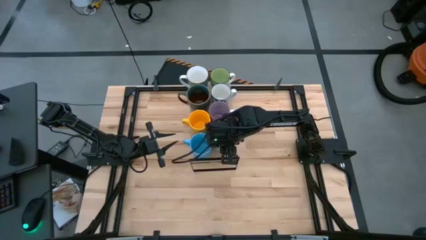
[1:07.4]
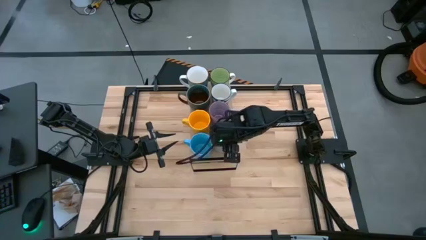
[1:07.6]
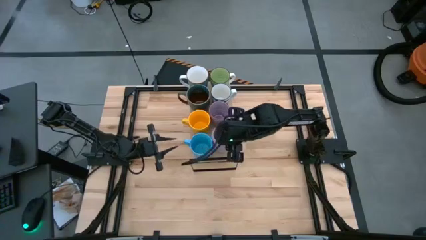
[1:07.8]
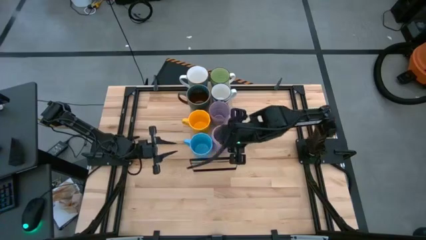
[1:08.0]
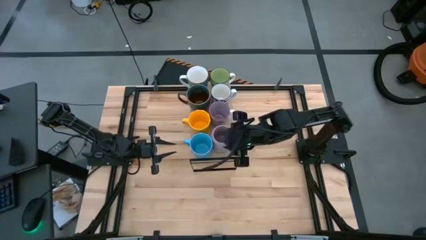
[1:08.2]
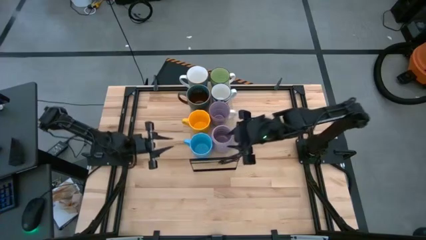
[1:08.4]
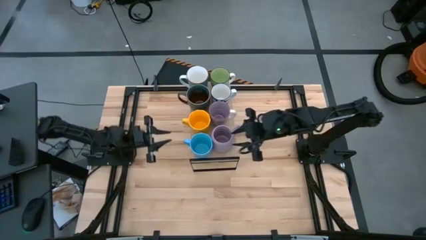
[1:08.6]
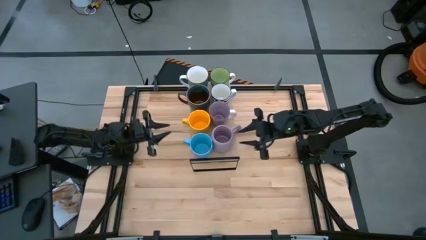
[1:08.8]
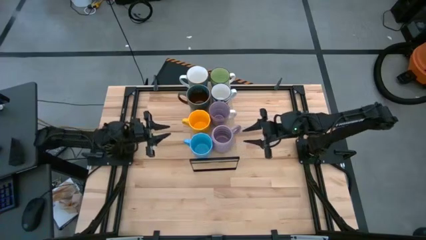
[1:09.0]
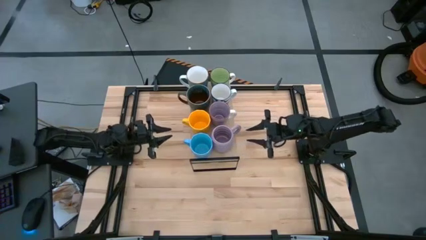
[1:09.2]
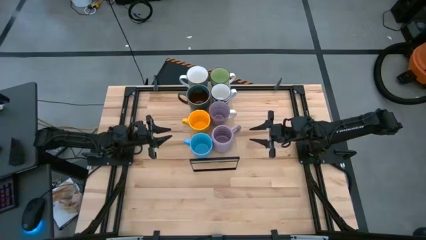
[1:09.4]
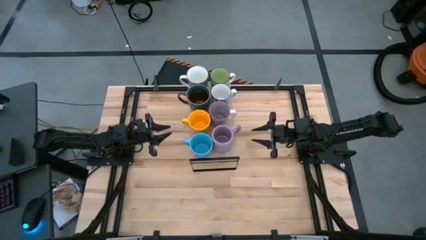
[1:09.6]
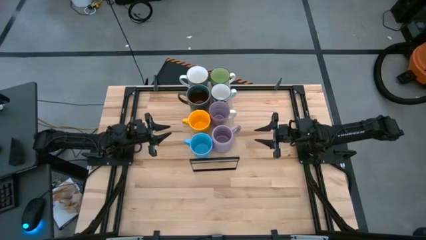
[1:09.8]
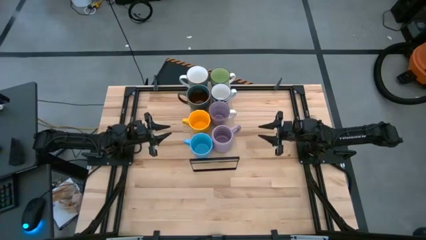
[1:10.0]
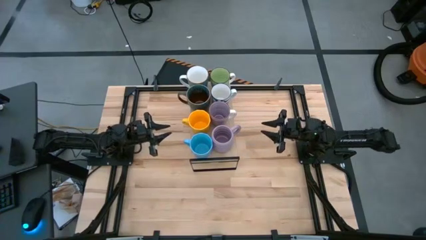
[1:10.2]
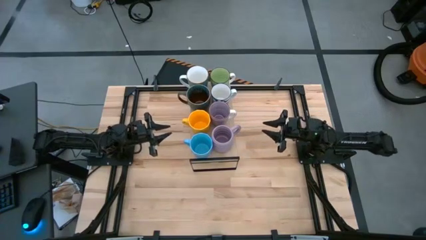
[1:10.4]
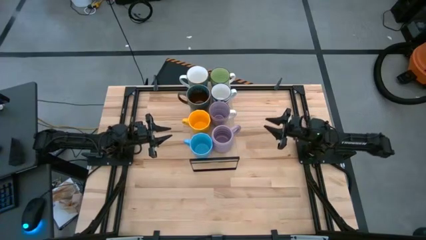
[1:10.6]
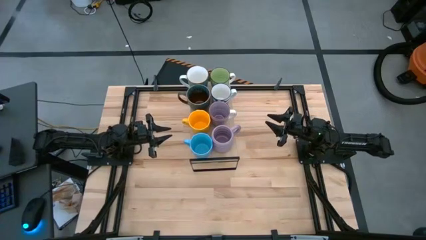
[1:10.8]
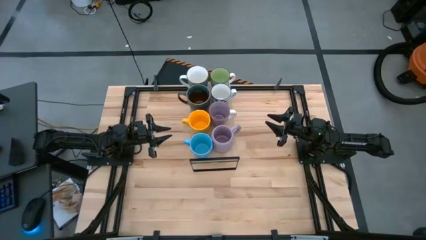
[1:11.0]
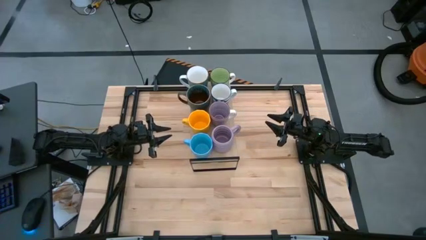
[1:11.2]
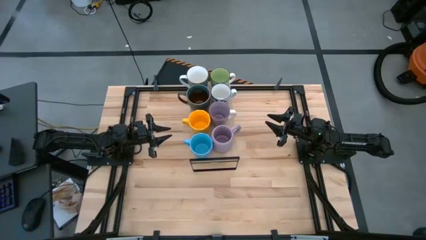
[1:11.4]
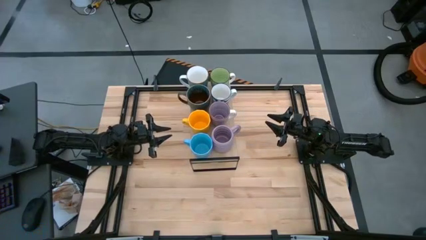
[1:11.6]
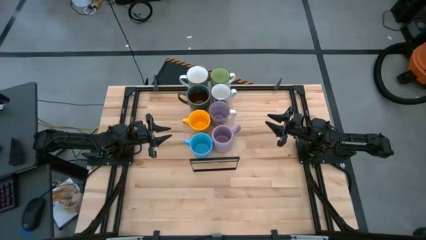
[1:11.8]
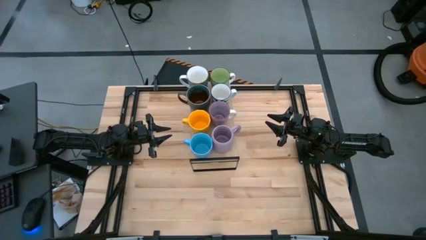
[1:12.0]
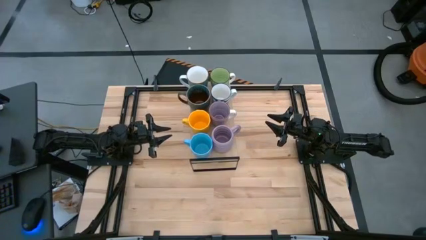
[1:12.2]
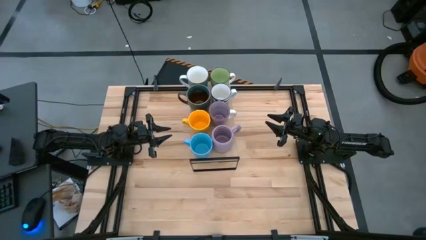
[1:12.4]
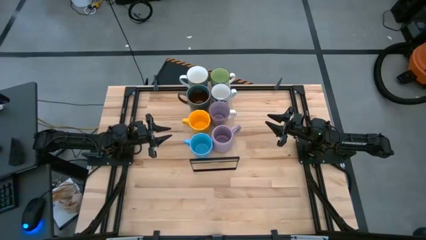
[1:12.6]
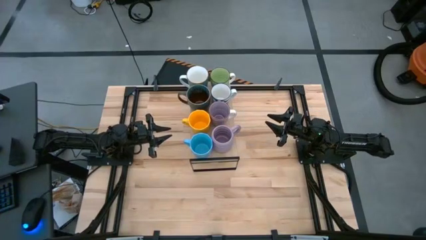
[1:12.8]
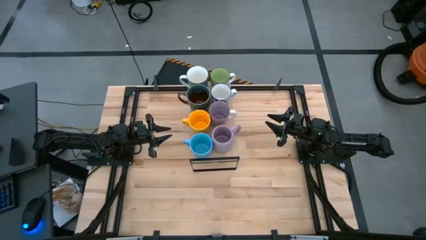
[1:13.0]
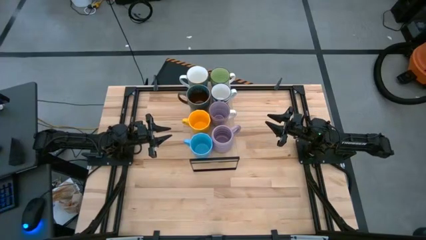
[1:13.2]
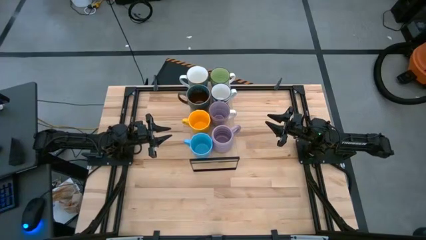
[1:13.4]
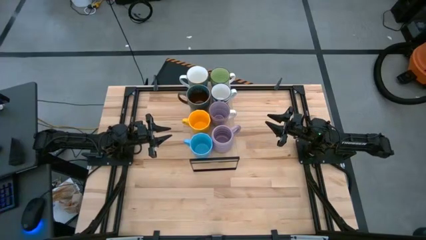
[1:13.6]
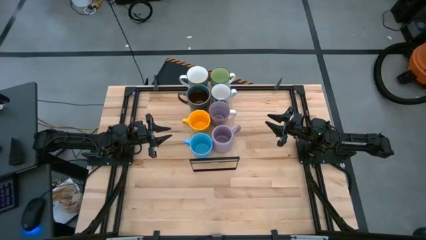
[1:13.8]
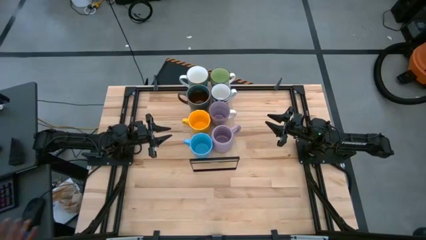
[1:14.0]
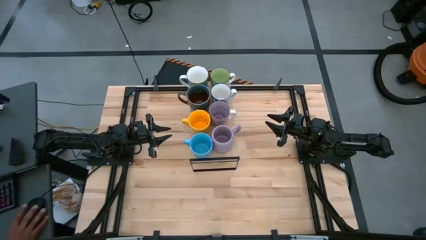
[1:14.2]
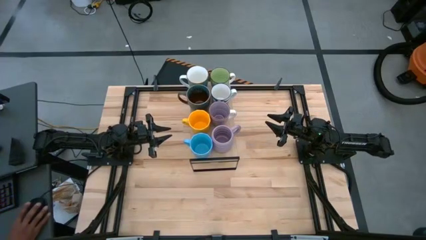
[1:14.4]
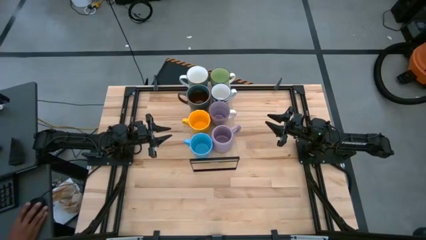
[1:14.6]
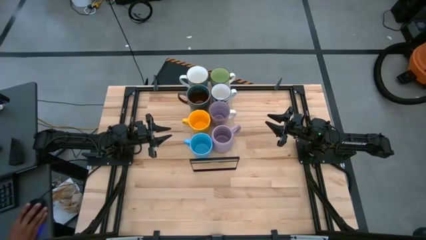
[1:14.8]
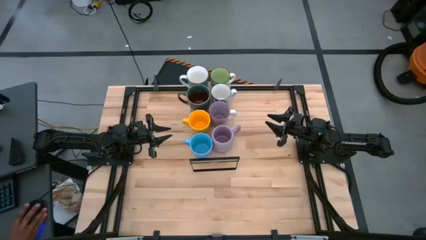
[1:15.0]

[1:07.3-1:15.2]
Task: Place coffee mugs
Return to Home Position

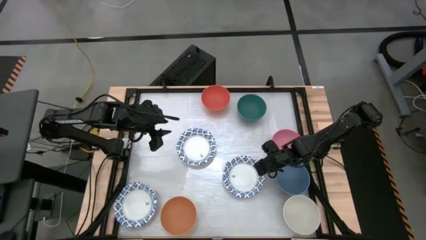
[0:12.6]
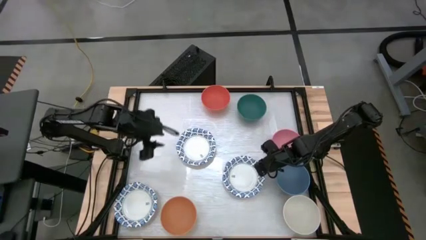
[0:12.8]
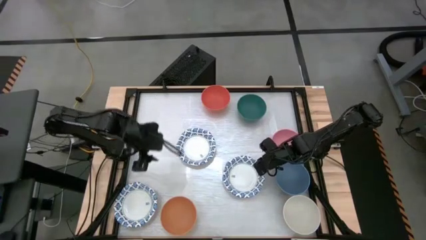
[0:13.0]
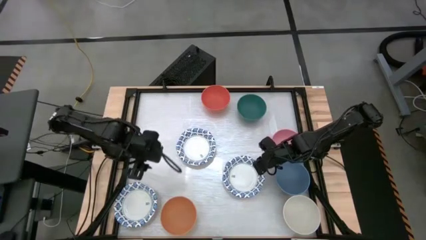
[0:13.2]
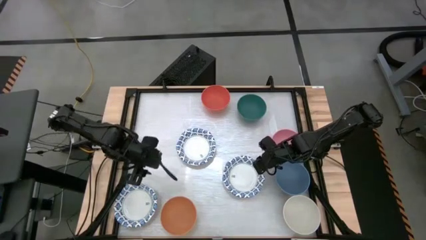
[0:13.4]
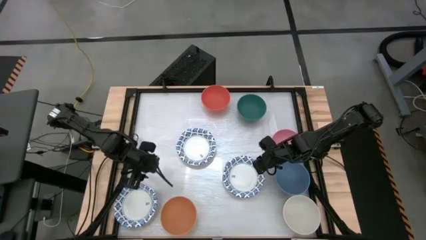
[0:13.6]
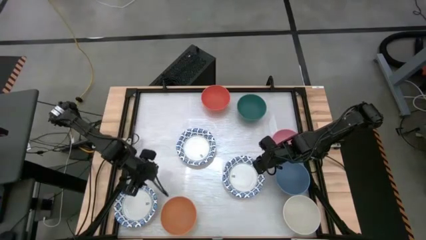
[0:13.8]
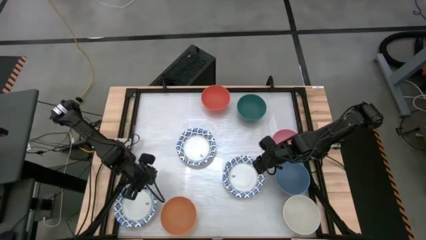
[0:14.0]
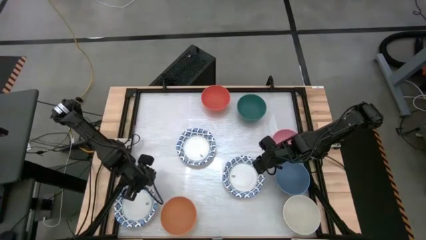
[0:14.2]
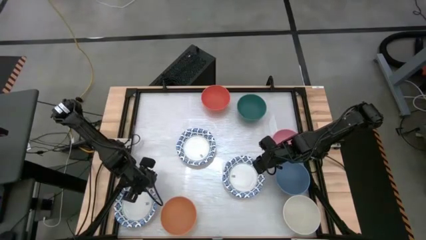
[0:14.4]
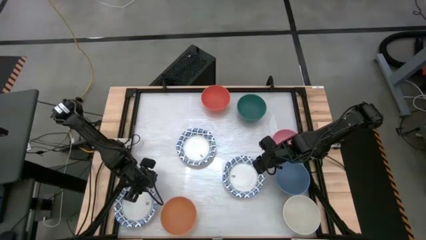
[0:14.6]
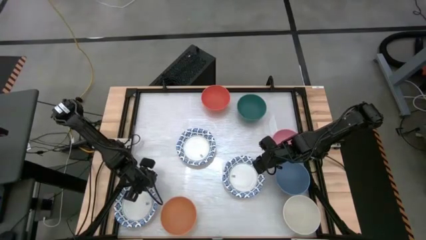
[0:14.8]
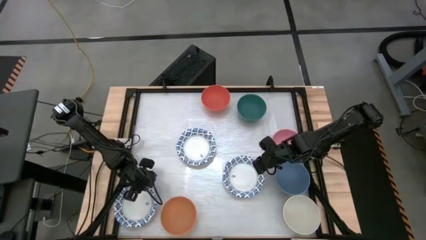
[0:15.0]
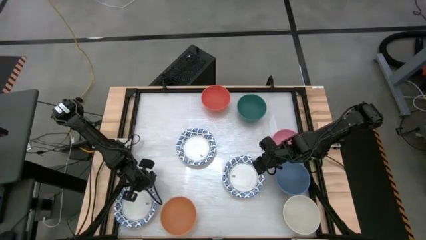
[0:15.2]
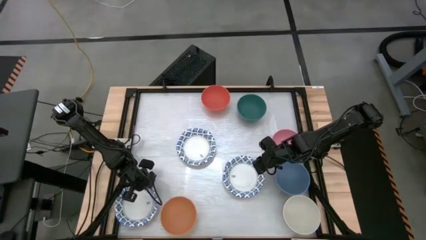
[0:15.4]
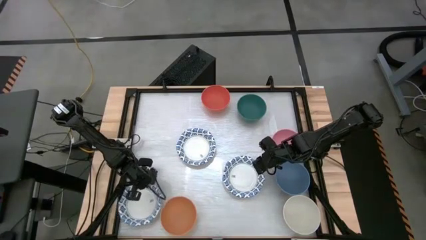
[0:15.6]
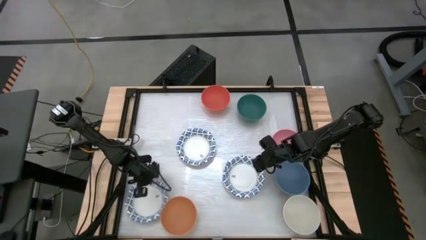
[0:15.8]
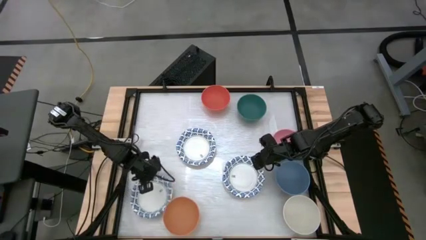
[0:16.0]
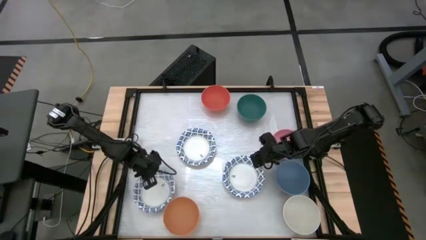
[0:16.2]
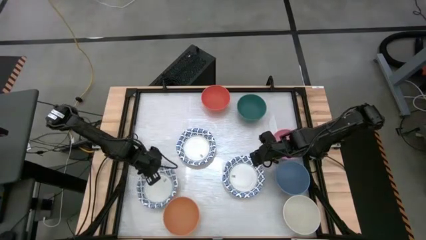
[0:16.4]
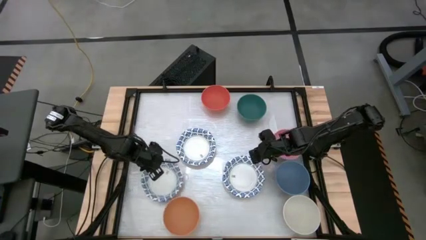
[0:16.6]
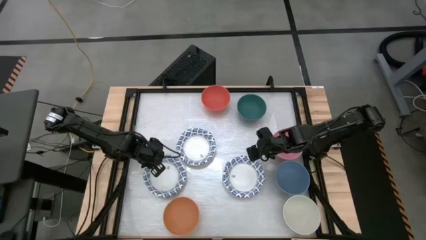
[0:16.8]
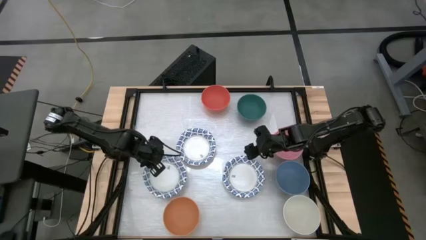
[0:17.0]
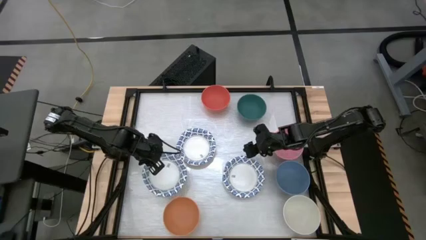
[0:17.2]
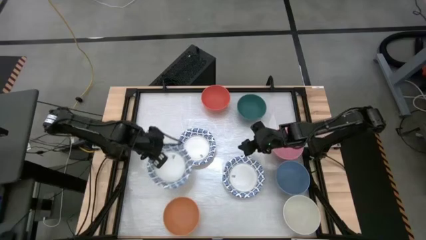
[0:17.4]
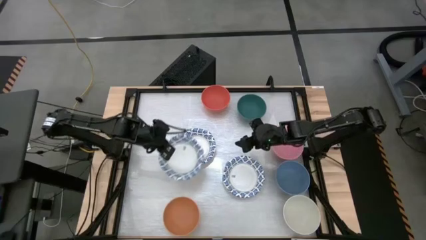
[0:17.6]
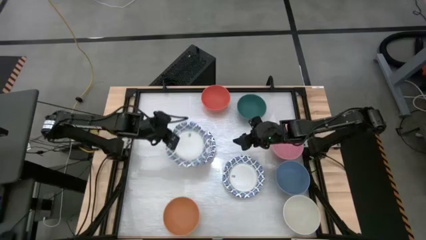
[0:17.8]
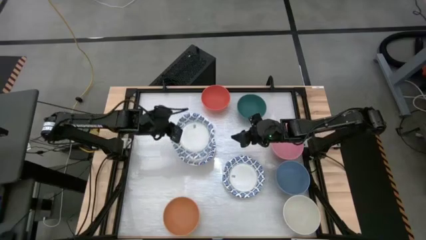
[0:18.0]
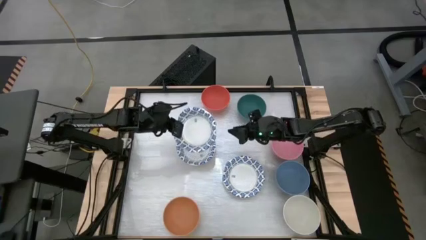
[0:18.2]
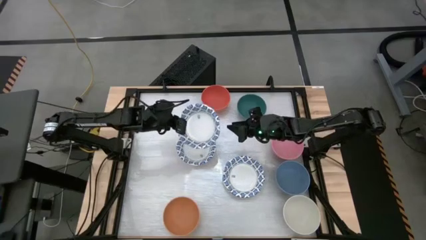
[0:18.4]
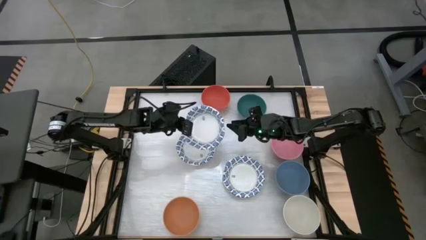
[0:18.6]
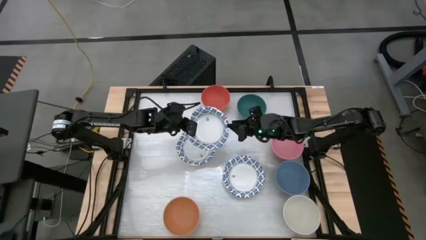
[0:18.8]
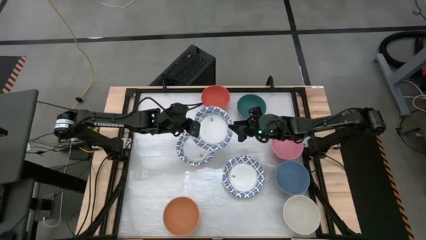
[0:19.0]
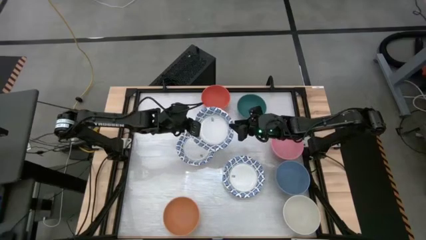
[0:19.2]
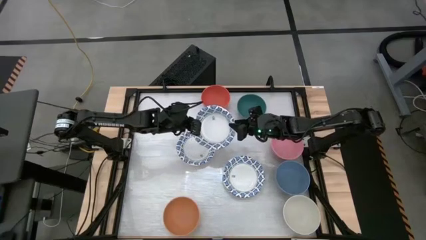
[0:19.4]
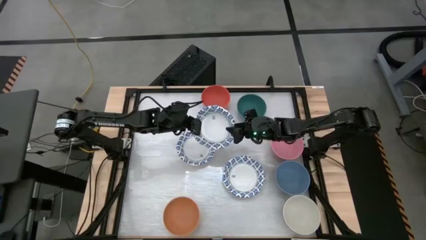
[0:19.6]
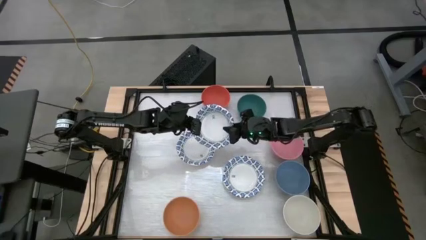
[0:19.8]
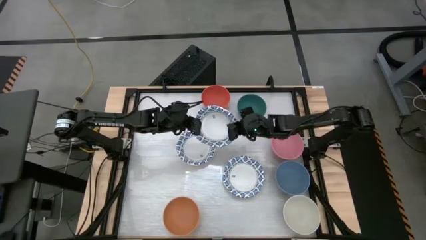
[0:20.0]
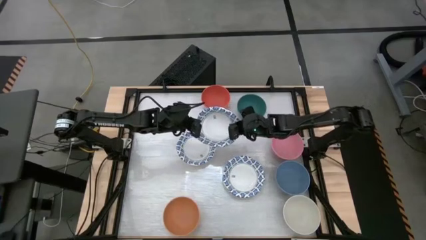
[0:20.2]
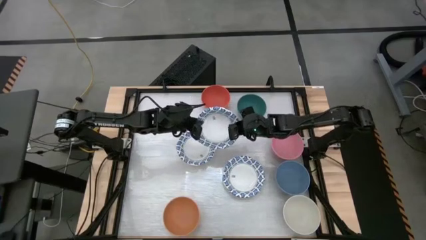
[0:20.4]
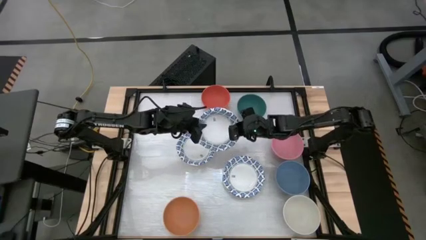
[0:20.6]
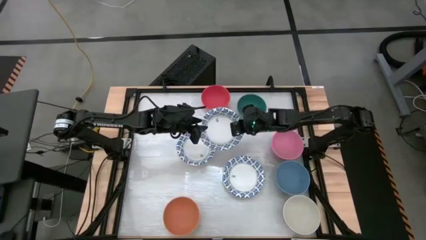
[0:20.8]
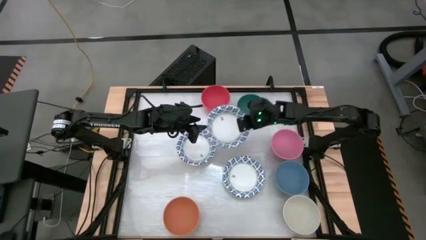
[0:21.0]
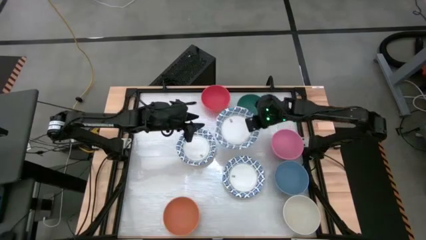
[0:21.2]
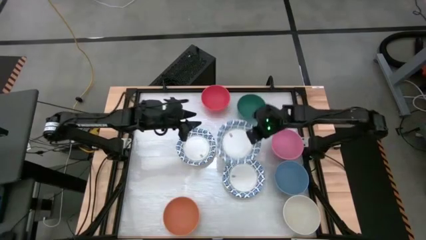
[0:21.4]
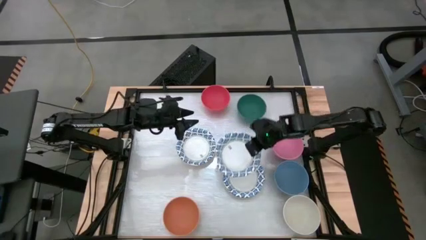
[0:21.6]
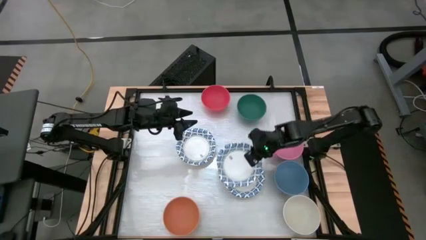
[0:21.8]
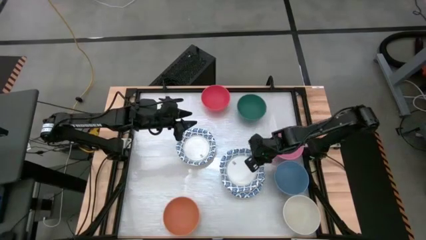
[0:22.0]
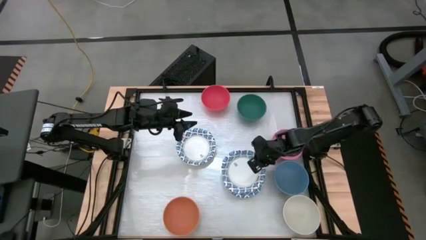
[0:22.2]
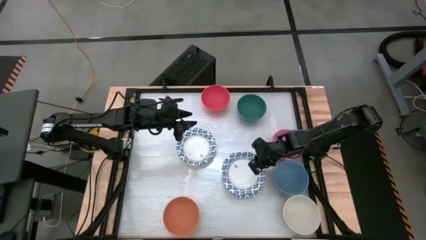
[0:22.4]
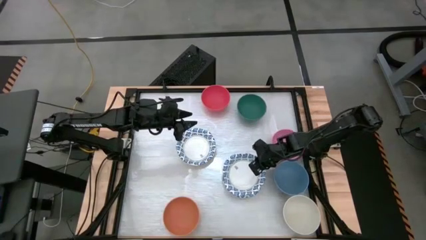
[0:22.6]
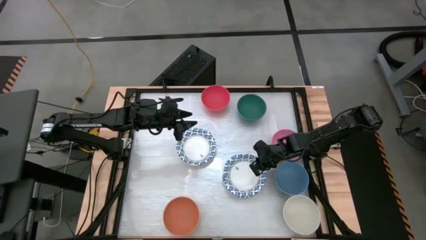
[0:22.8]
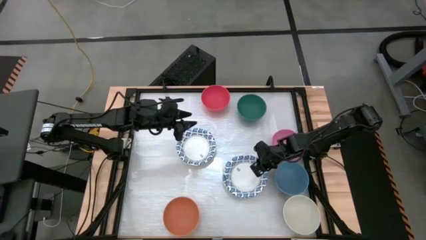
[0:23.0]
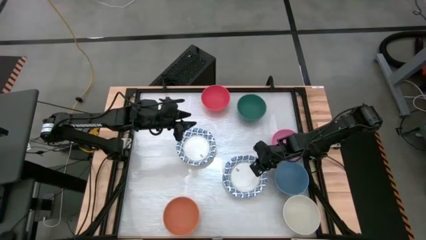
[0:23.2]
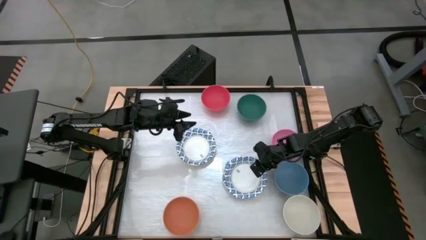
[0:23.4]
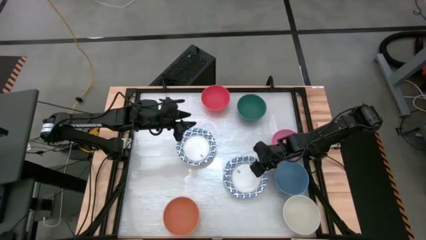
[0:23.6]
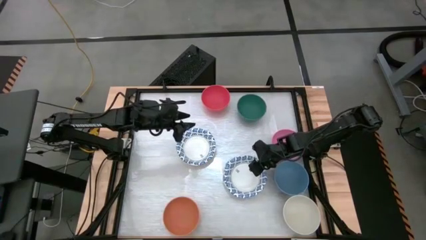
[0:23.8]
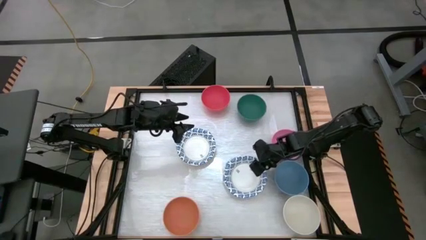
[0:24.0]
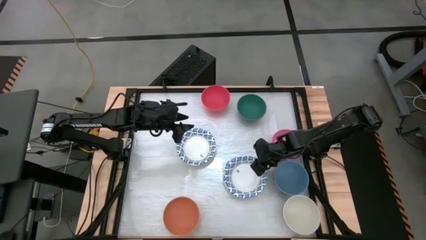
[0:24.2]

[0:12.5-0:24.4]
Task: Nest bowls inside each other by size order
Stack the bottom left blue patterned bowl into the right blue patterned bowl
